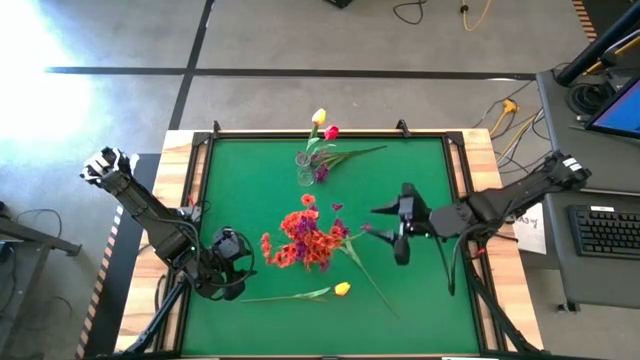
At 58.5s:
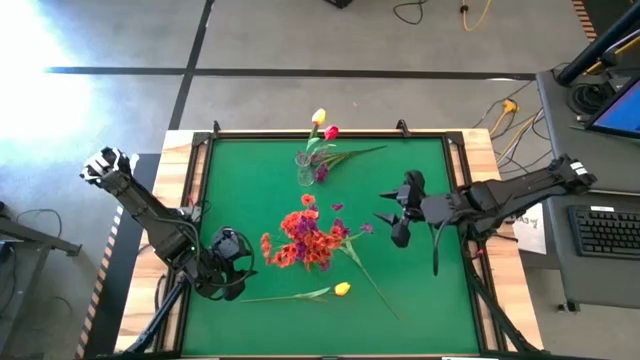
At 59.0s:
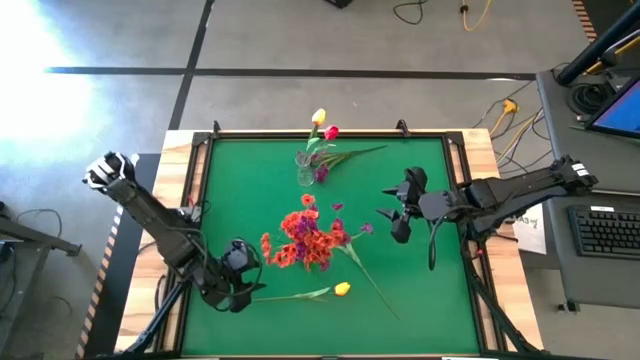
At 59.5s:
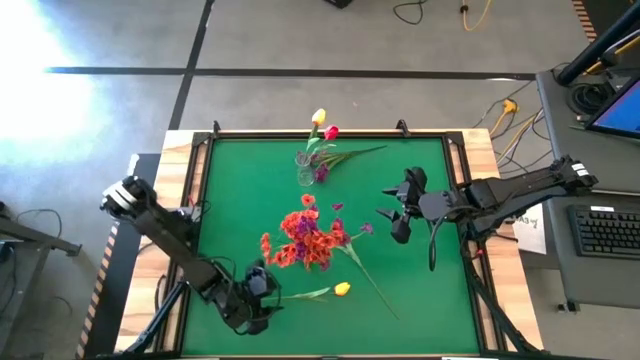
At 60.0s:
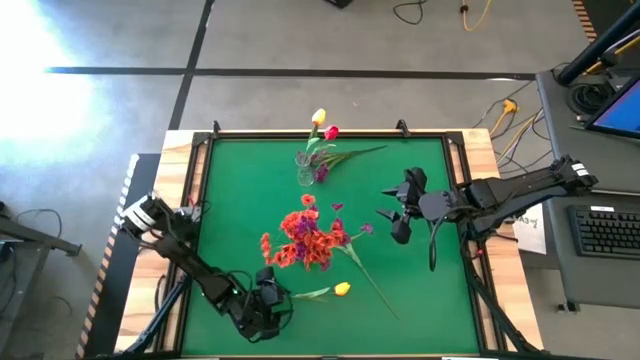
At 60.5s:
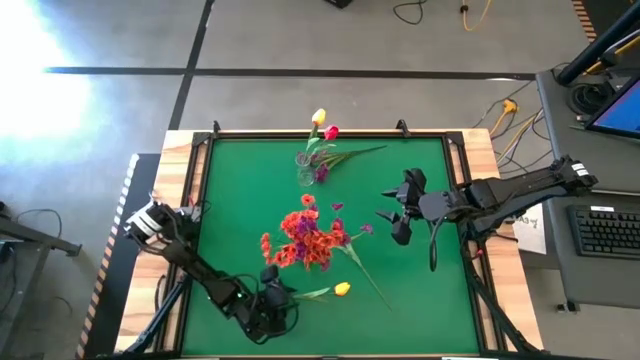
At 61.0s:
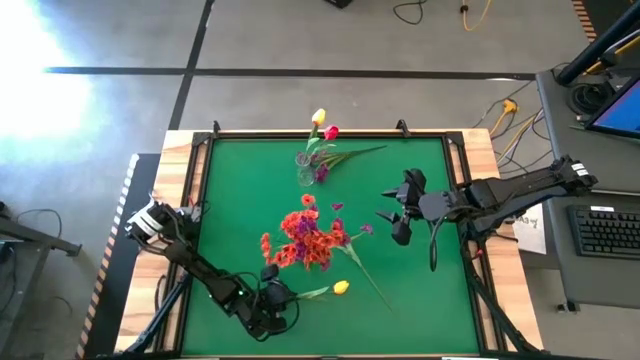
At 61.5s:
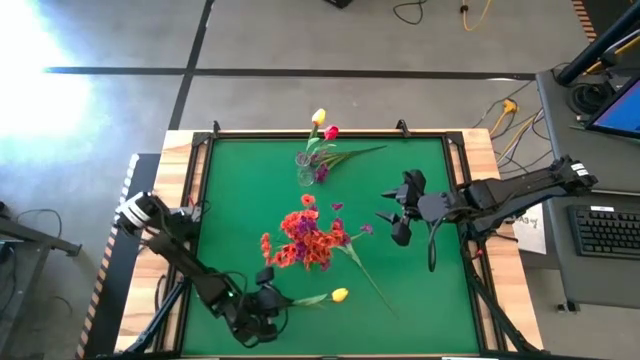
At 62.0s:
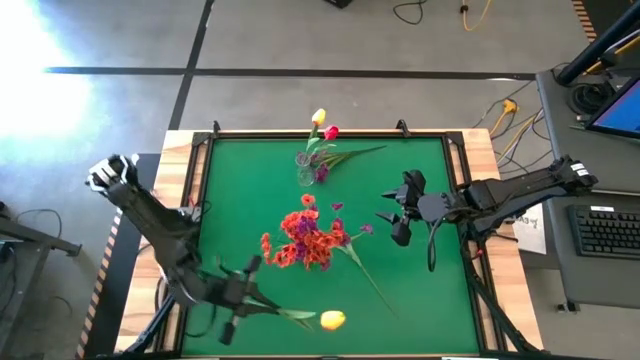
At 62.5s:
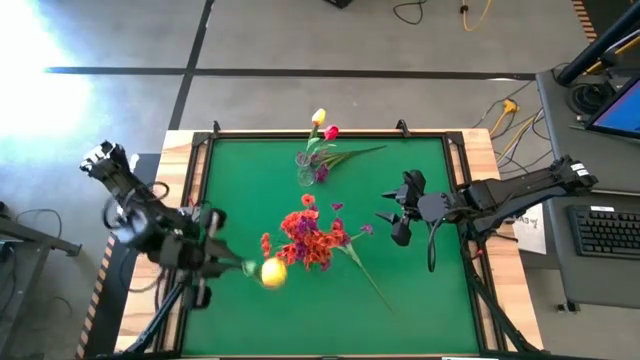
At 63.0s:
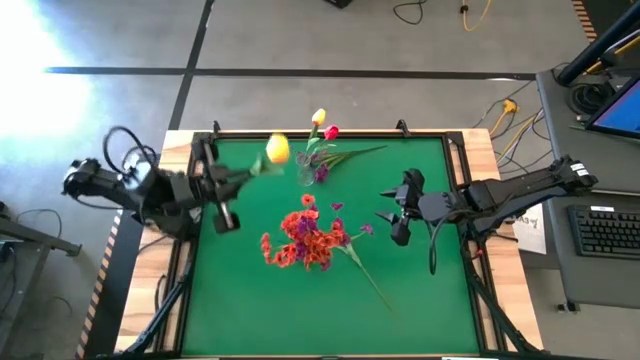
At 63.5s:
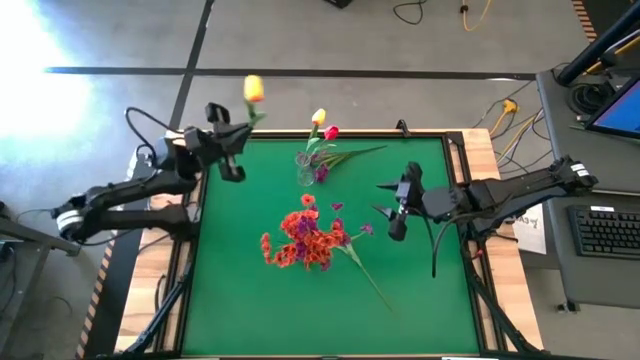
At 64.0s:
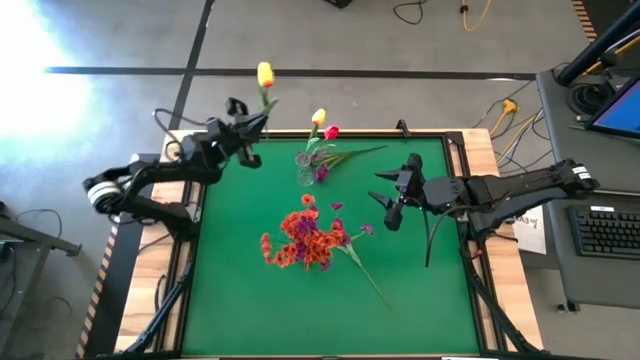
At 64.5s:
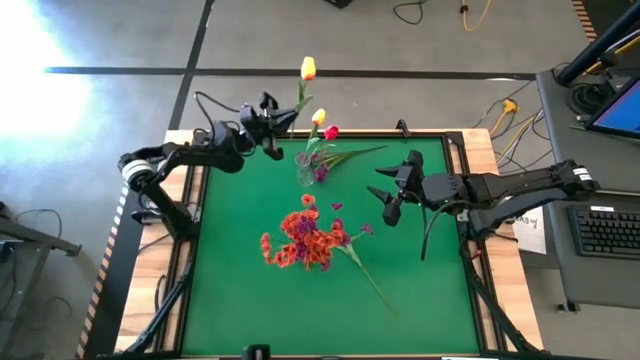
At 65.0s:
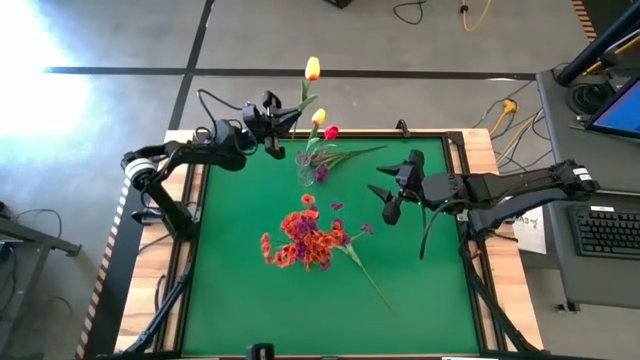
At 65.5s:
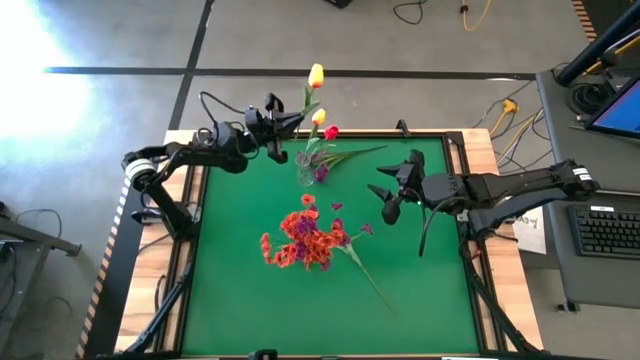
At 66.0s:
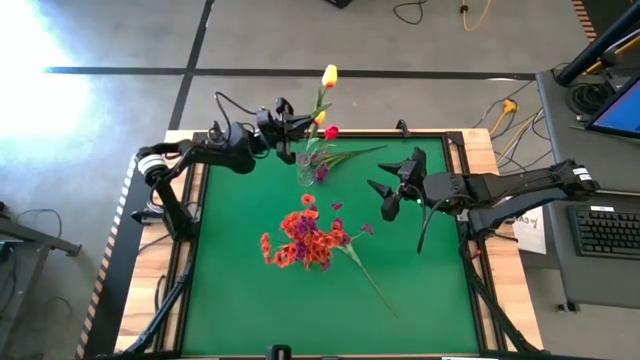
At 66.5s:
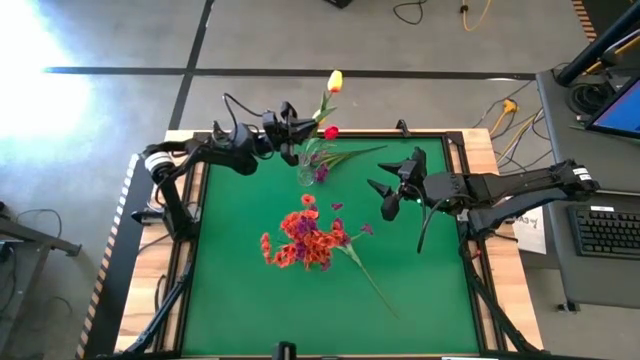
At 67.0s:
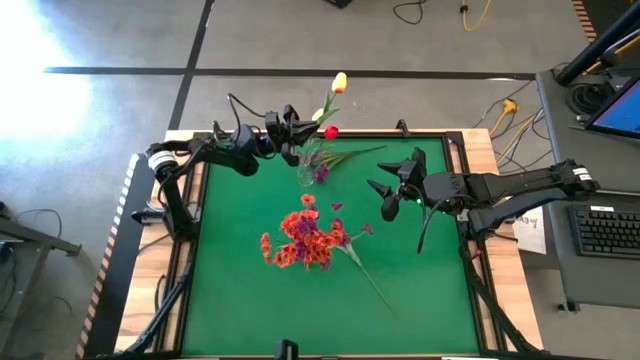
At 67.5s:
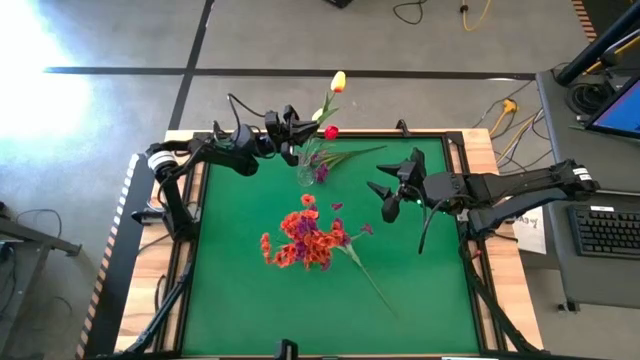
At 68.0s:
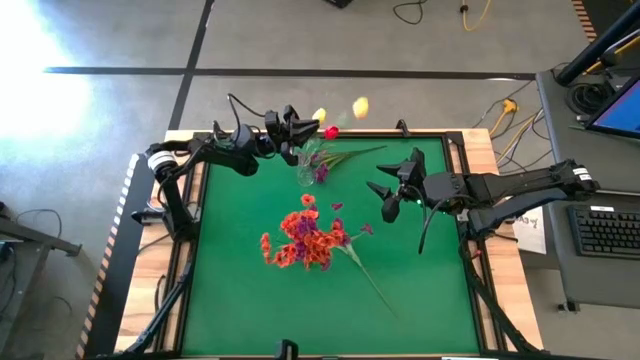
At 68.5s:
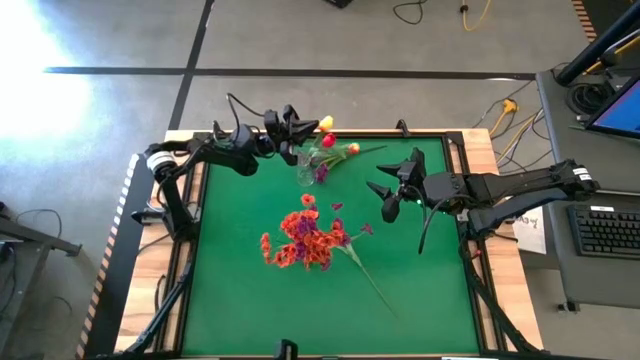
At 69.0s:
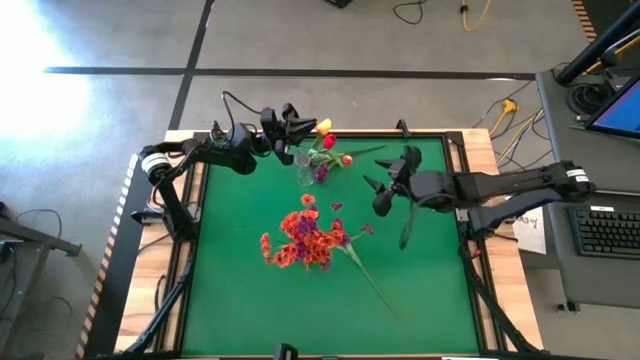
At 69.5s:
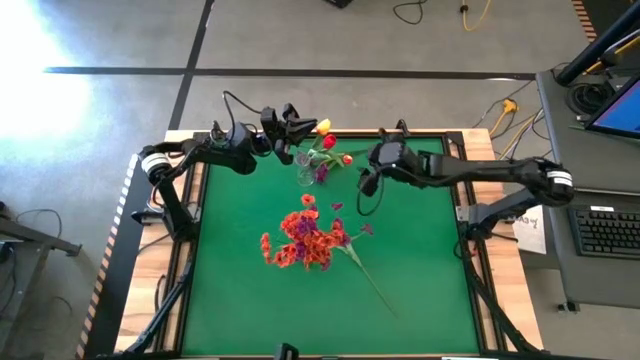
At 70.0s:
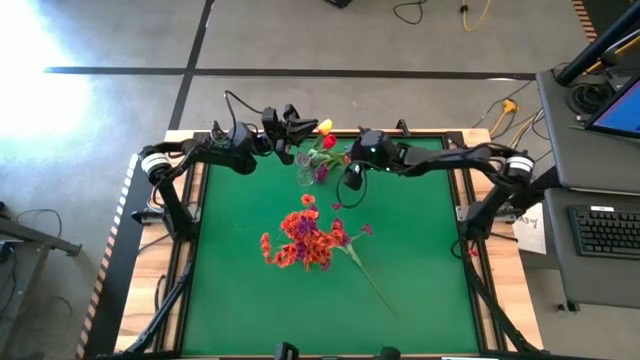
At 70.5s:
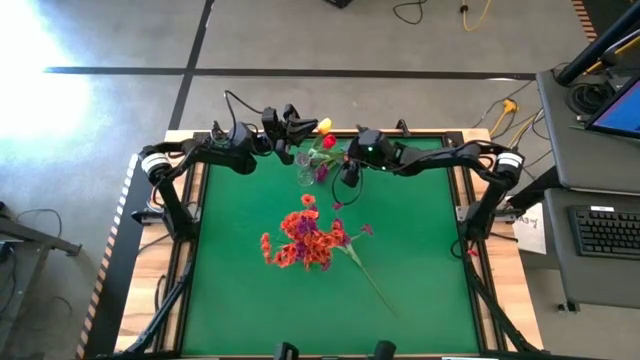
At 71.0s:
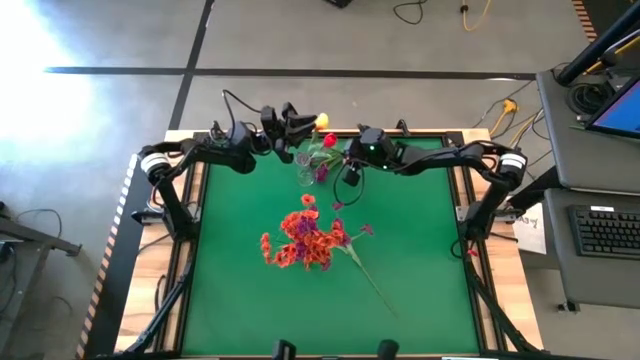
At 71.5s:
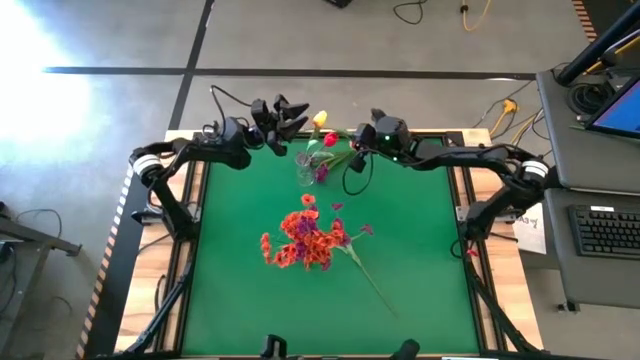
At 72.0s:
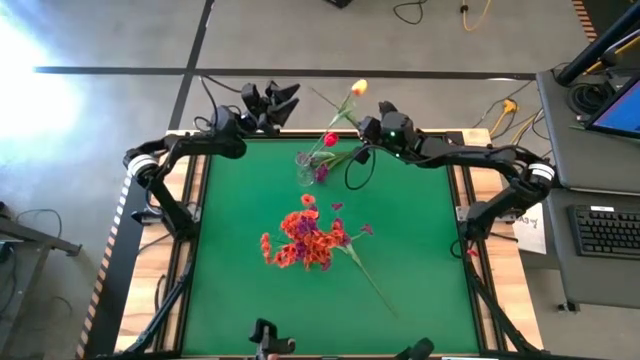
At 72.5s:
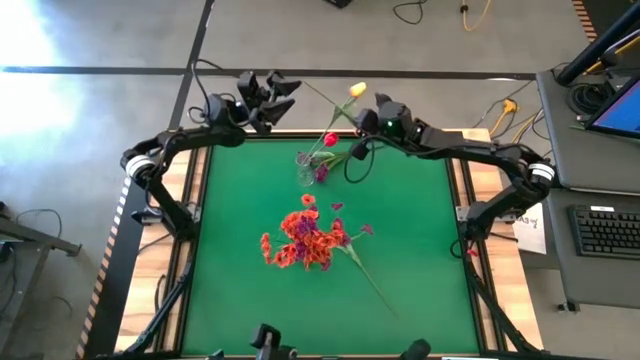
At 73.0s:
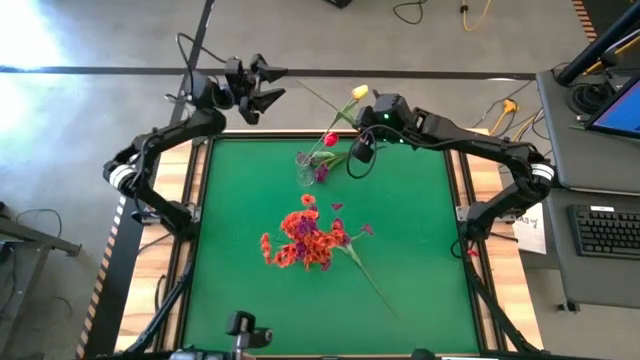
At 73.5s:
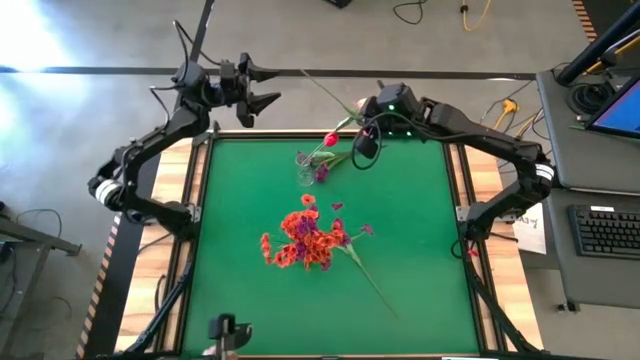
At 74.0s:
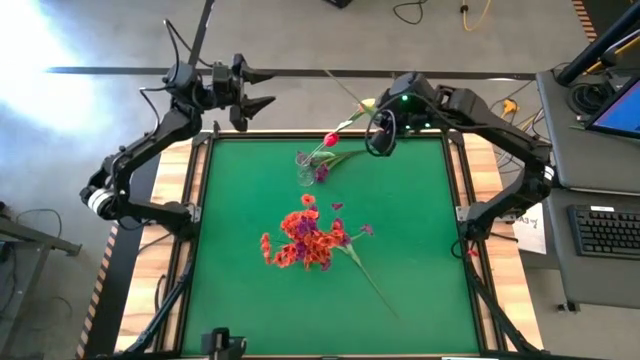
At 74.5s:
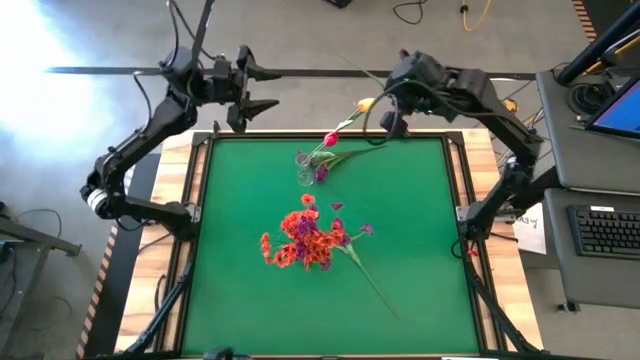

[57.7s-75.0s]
Task: Sort flowers into vase by color
Put the yellow tulip into the transparent vase

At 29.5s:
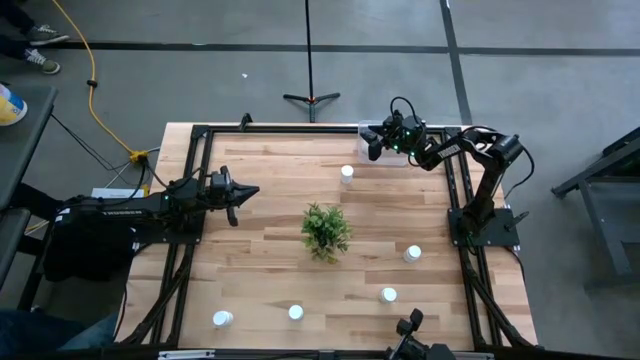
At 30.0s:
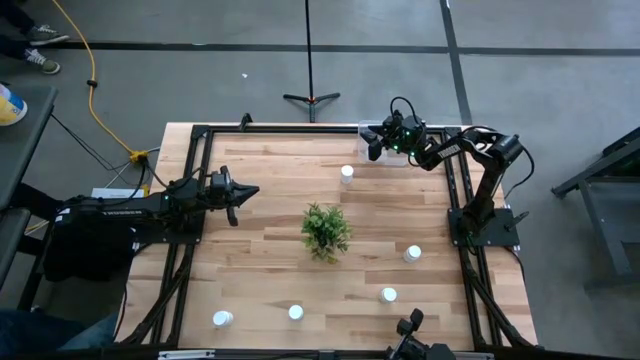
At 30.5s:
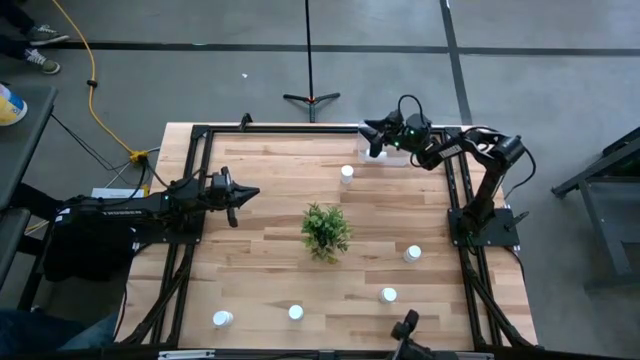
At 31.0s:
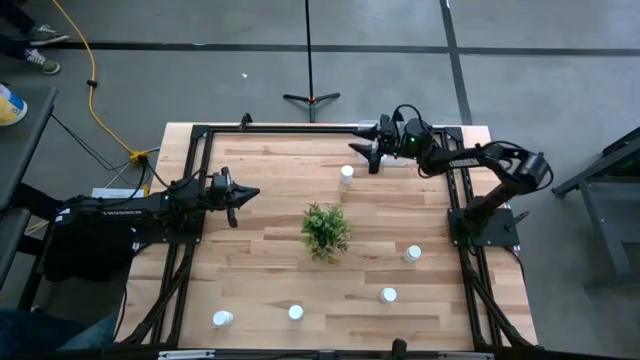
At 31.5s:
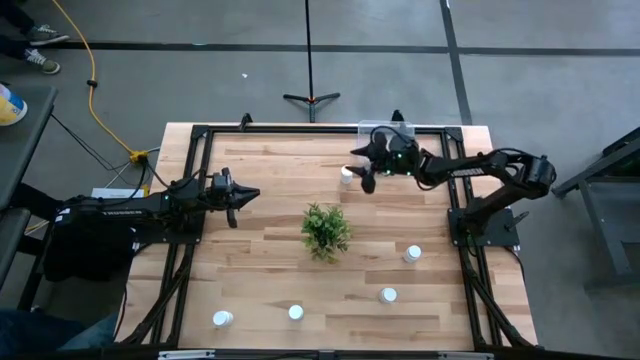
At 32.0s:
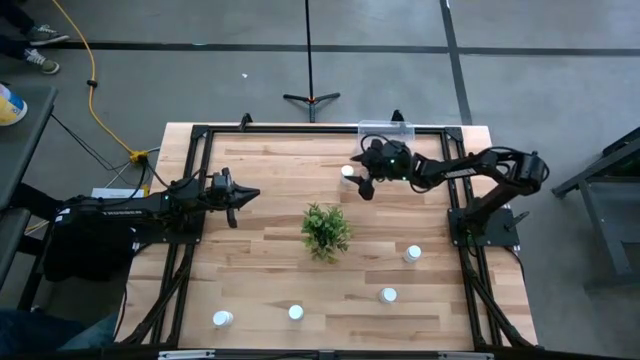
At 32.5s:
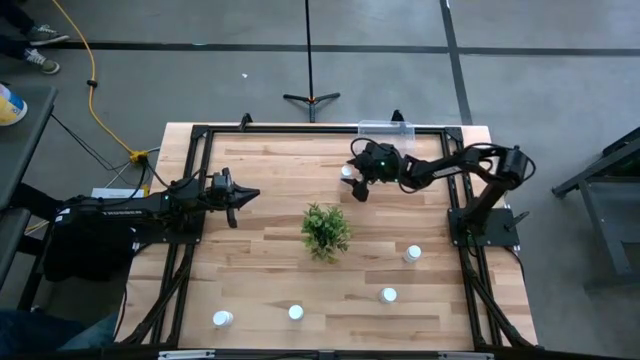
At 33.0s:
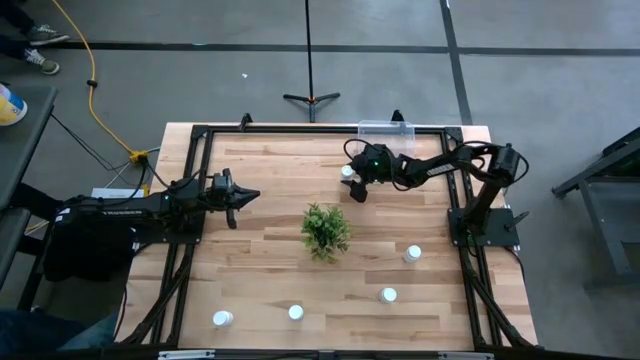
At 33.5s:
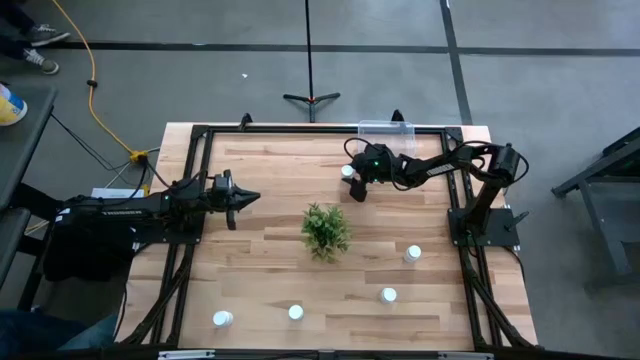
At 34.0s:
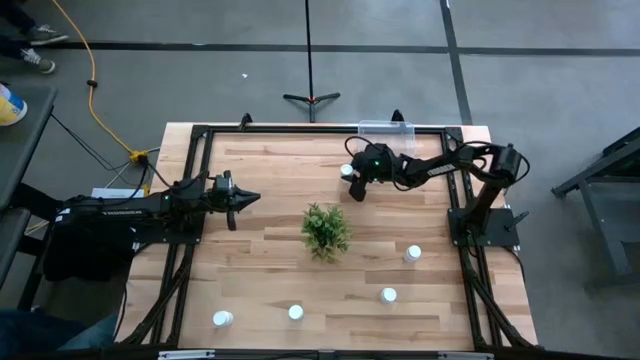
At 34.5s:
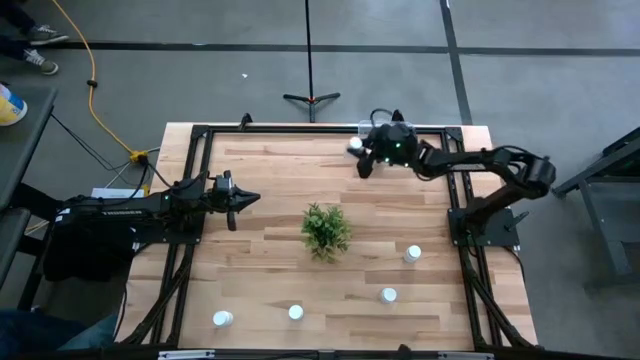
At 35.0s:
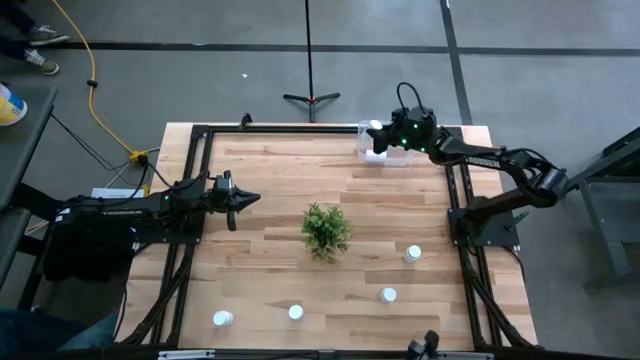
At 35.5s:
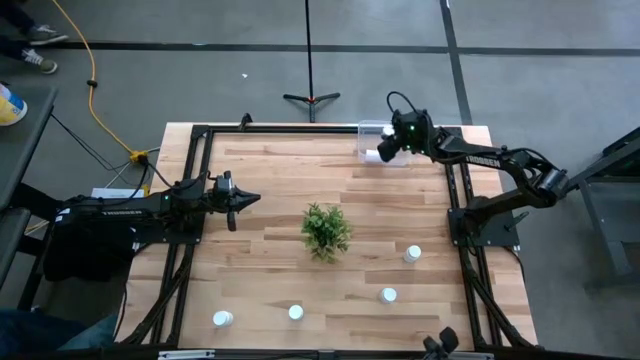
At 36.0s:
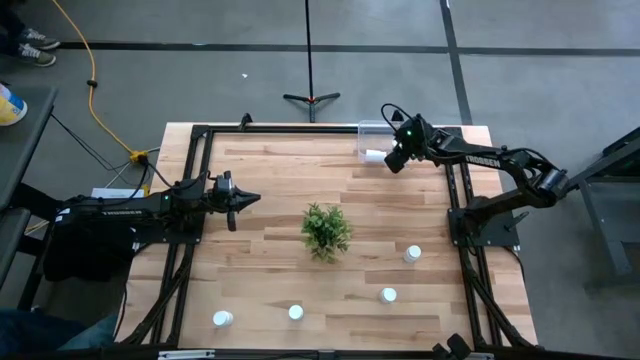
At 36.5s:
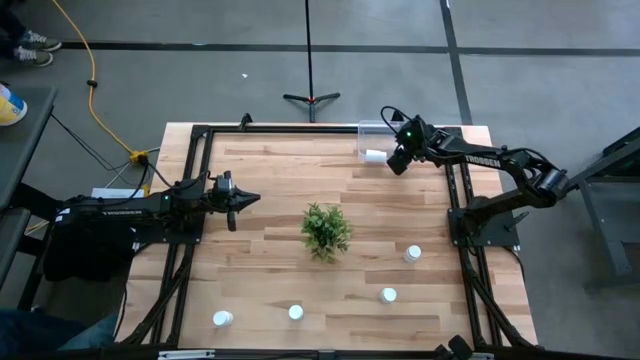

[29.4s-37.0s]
Task: Pick and place pill bottles into a basket
Put the white pill bottle into the transparent bin
